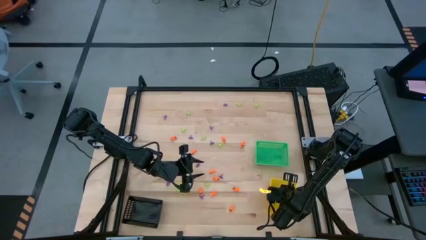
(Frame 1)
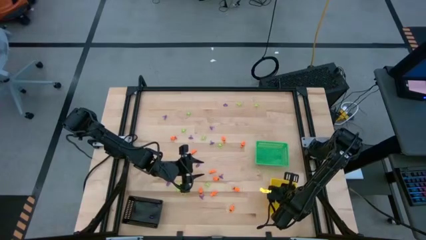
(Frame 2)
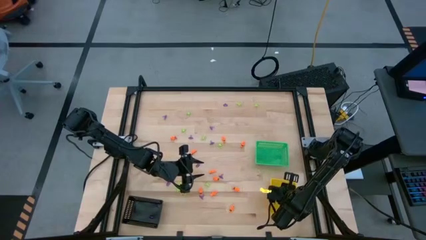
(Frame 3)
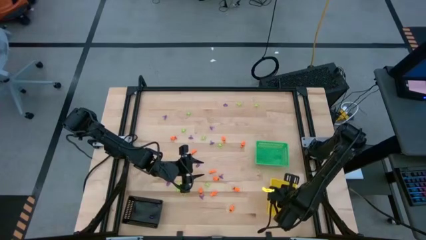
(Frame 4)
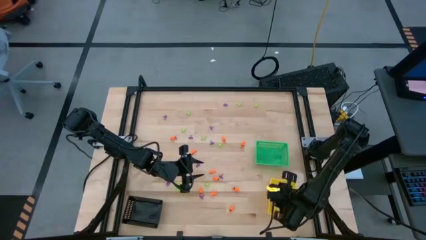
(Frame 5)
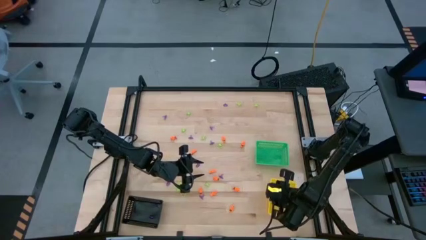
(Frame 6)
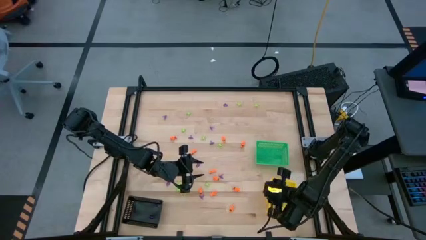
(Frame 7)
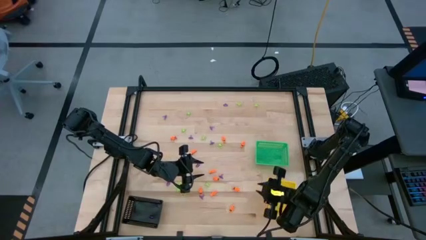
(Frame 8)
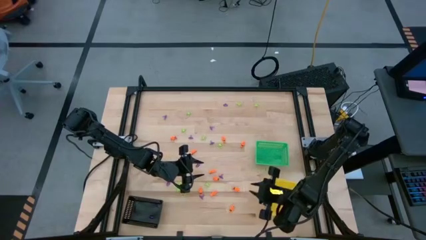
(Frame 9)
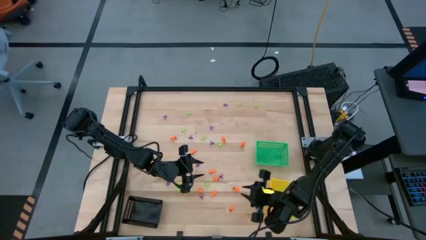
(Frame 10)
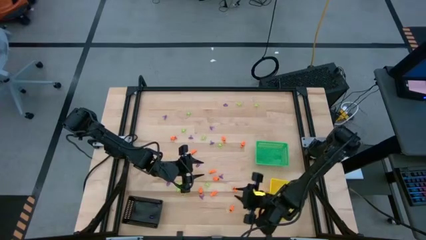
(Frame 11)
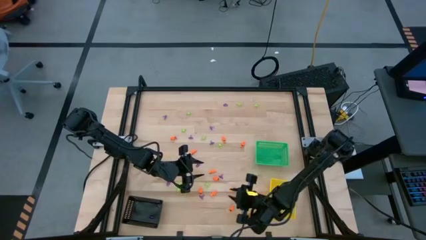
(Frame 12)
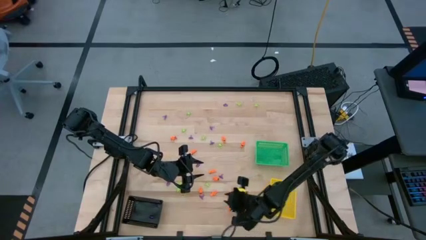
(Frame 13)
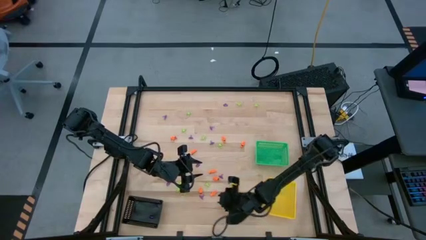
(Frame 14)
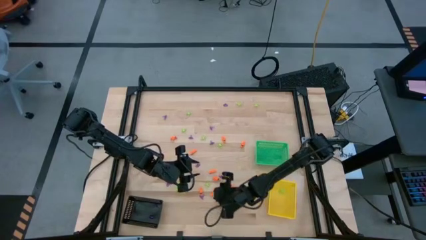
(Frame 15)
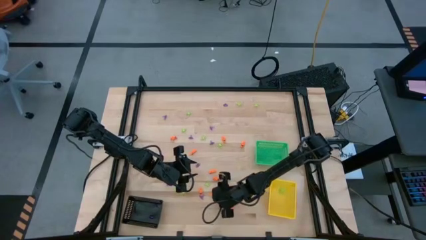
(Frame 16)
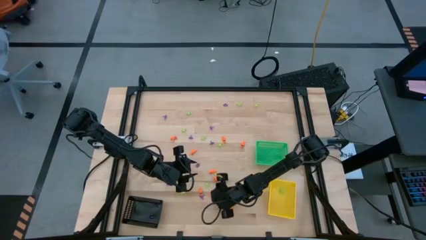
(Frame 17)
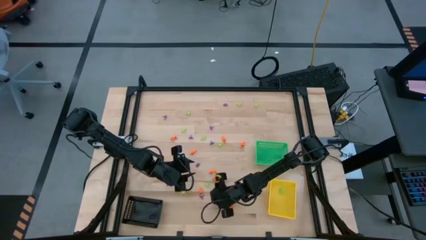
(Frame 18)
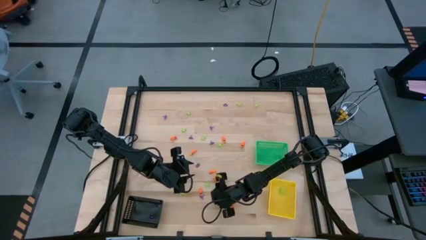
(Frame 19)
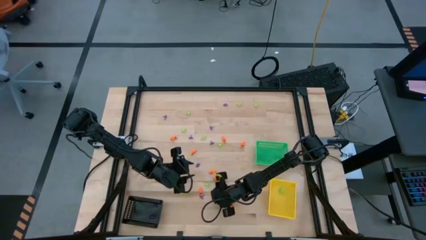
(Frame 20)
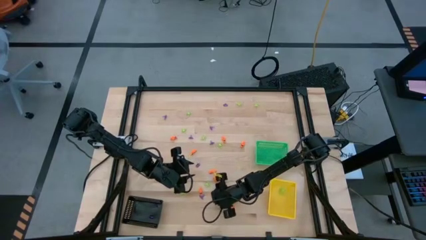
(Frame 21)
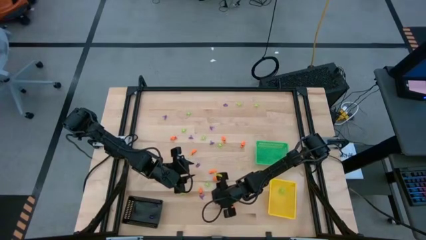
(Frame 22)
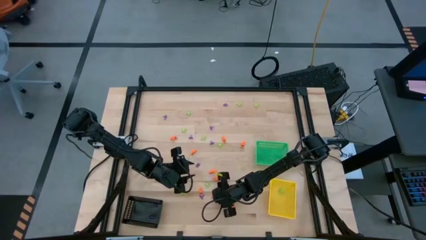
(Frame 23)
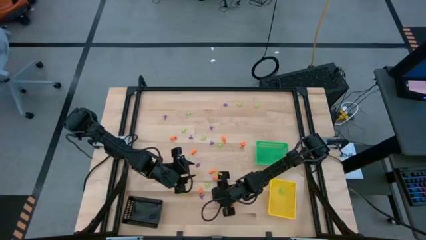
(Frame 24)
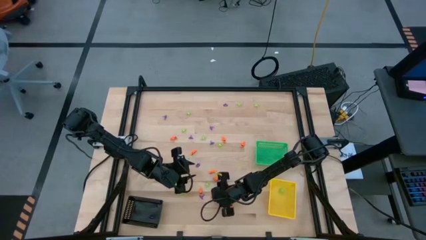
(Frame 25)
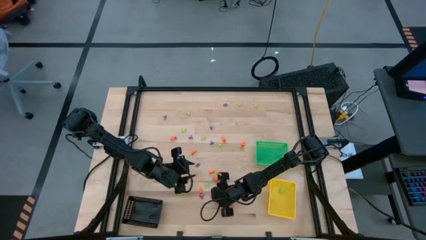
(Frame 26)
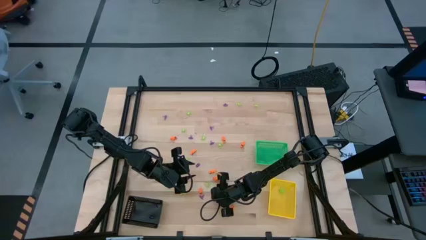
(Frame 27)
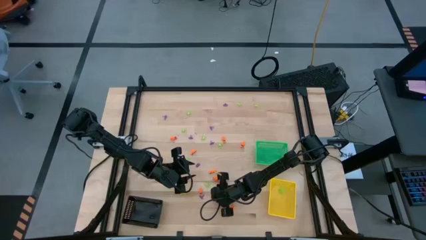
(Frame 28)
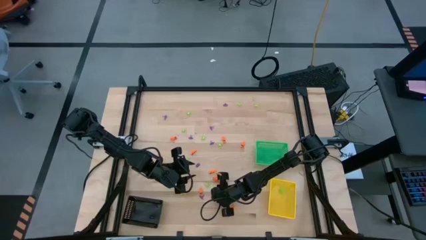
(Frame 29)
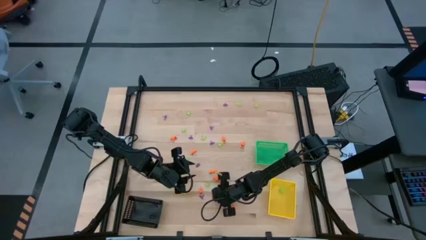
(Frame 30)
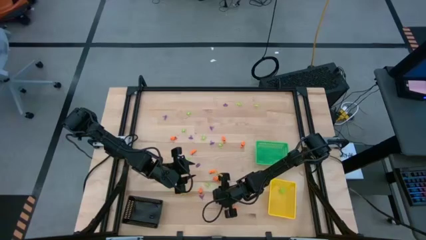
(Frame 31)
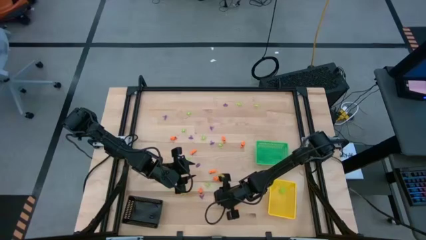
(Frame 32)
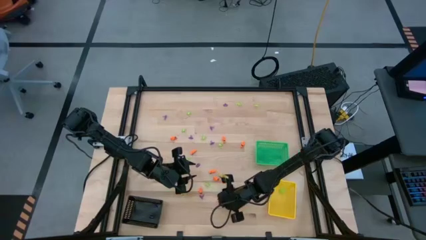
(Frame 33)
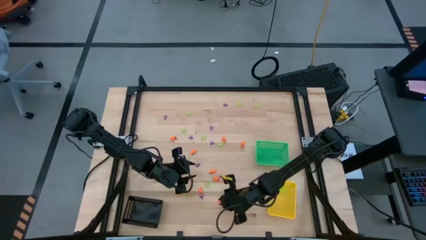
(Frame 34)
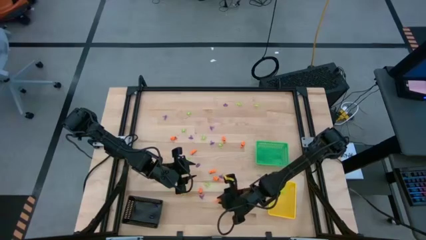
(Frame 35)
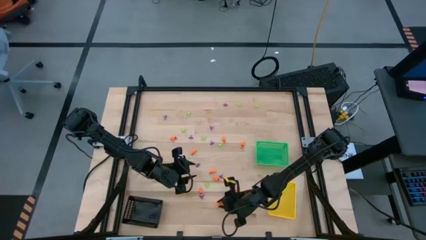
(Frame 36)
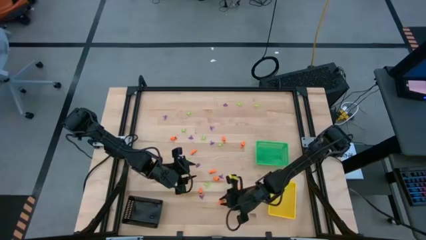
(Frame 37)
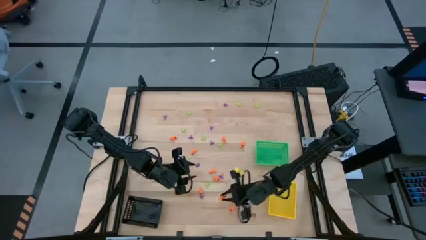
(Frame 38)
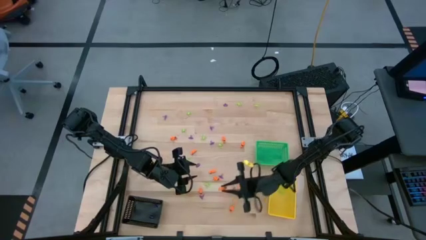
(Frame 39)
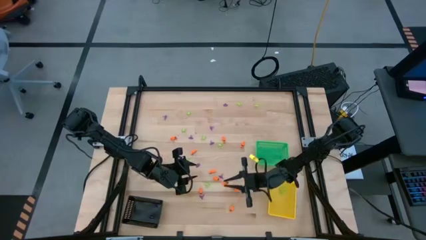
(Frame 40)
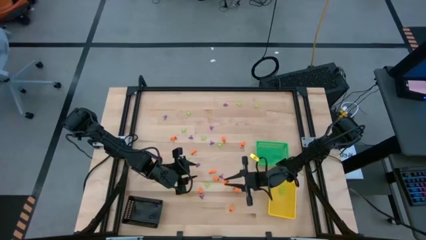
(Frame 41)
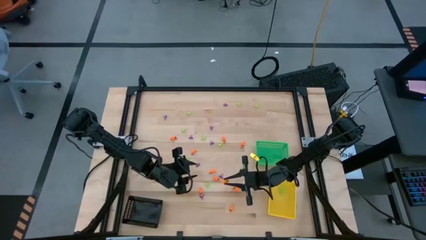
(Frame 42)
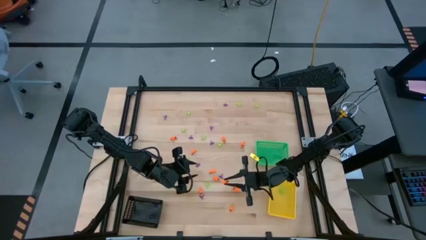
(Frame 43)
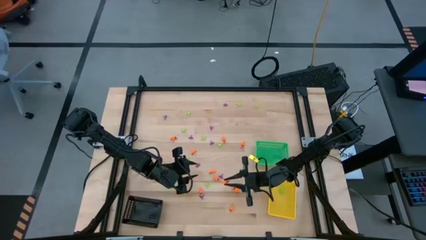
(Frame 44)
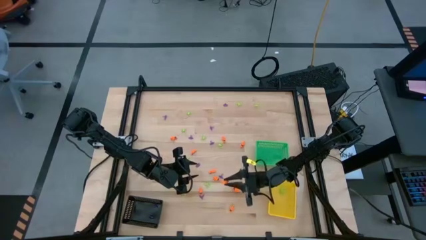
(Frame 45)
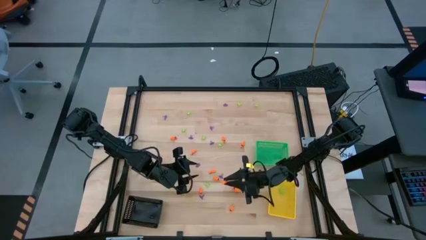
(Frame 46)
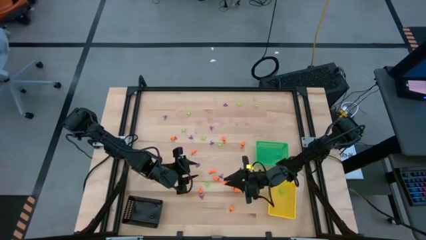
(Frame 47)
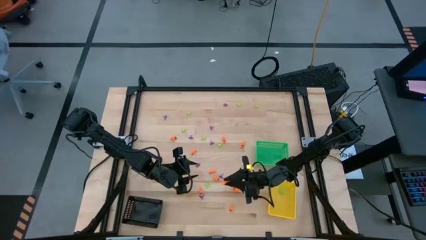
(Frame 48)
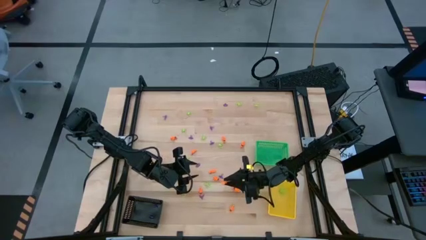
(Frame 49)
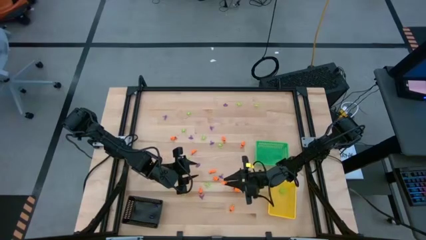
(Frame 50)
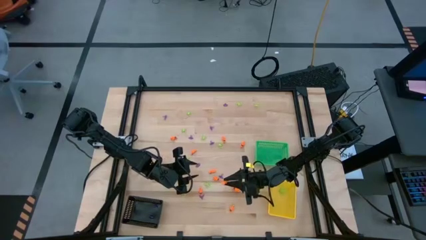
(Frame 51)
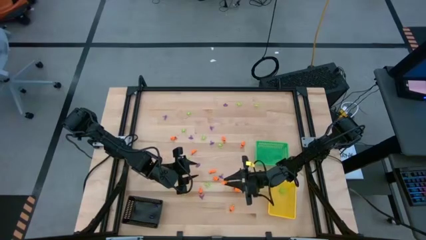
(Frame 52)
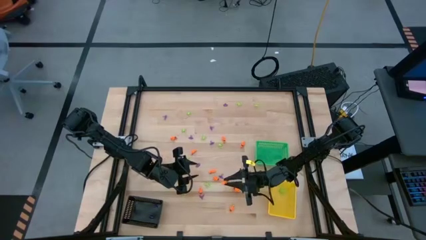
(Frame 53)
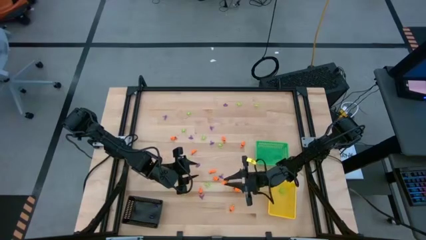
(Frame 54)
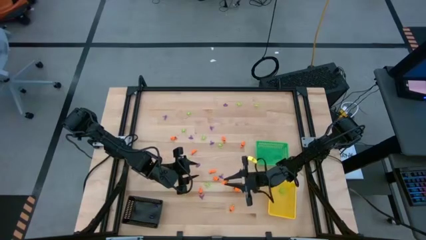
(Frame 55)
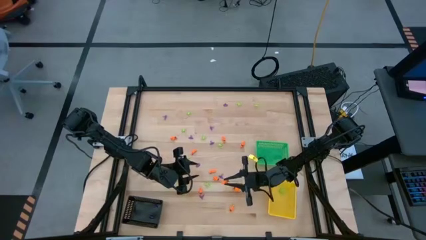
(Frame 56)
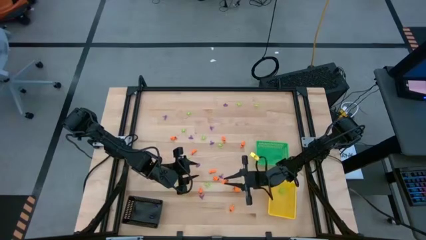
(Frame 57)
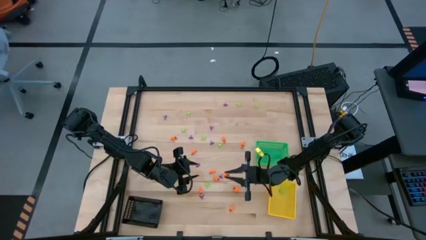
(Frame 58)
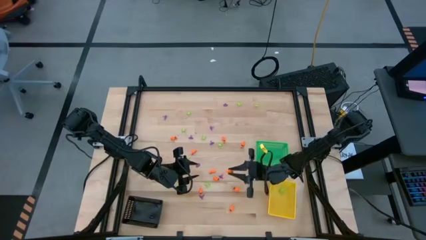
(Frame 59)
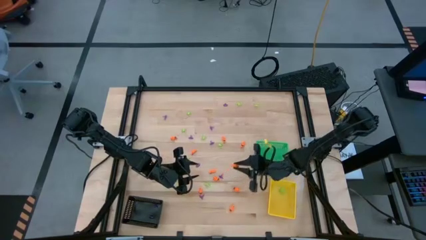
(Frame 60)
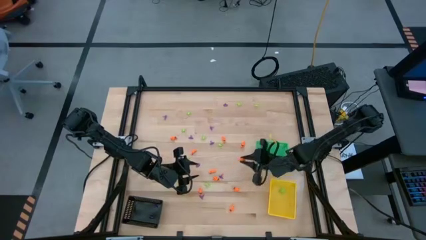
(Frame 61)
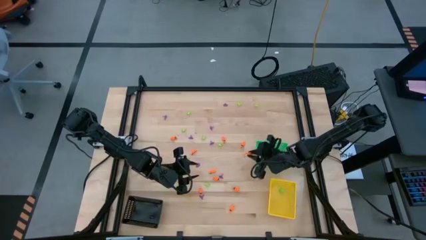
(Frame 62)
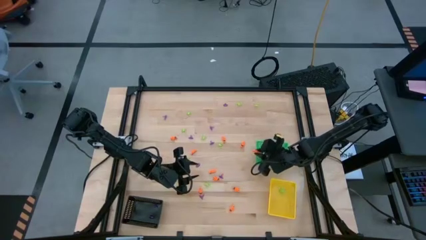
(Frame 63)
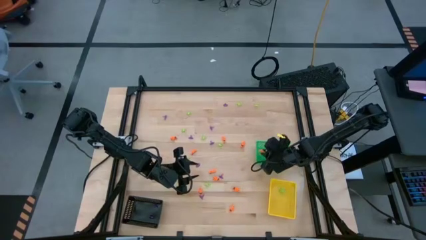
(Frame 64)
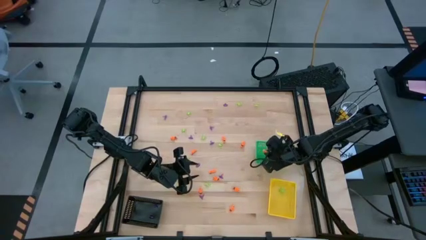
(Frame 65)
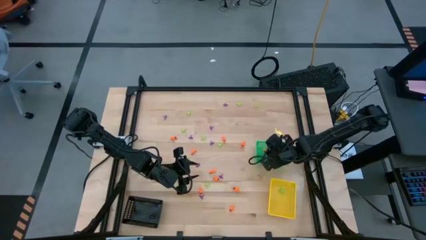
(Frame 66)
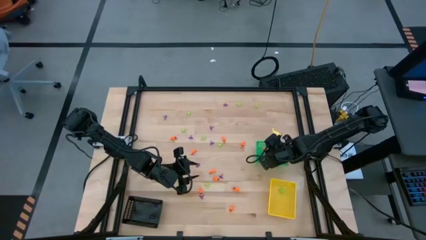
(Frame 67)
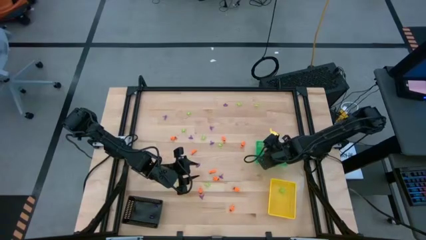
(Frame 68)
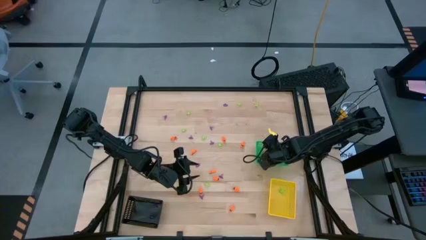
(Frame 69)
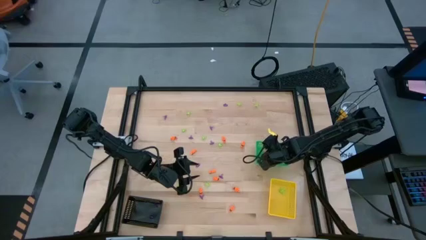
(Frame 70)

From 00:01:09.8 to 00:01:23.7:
Task: Sort Halloween decoration
Put the orange skeleton toy into the green bin
